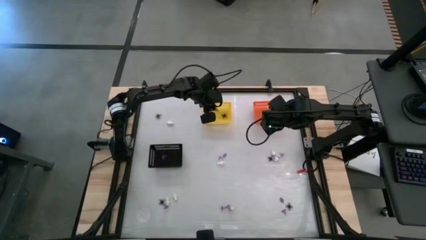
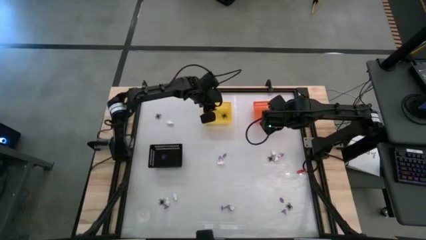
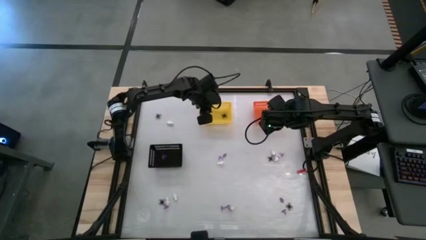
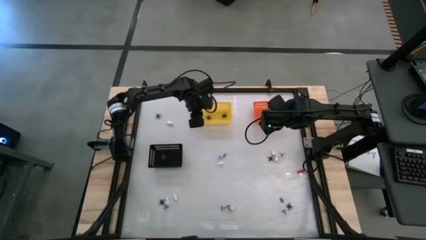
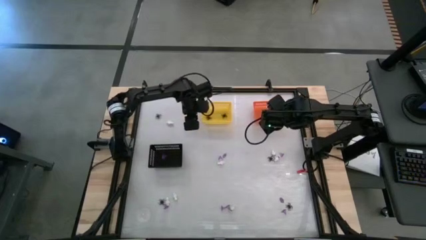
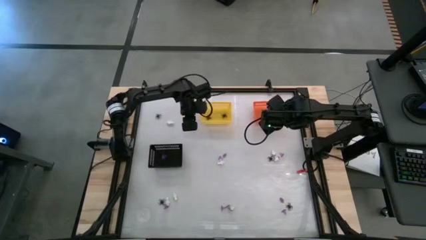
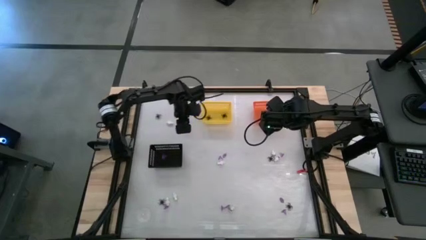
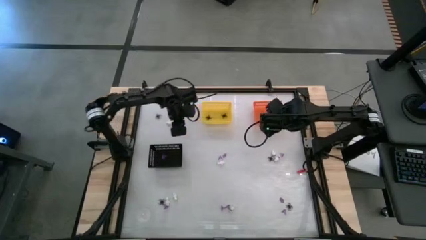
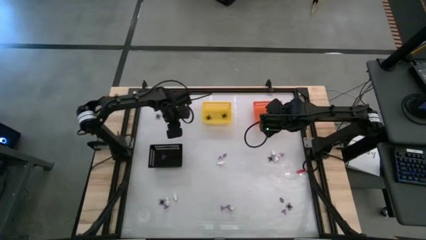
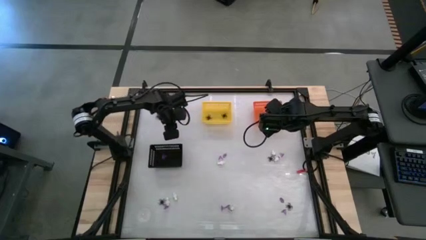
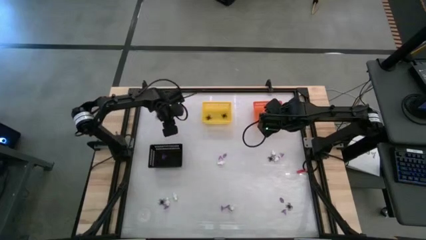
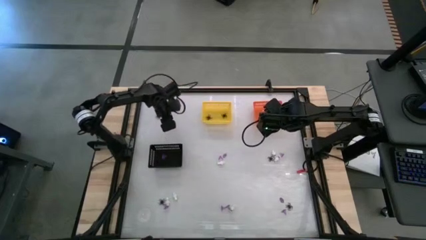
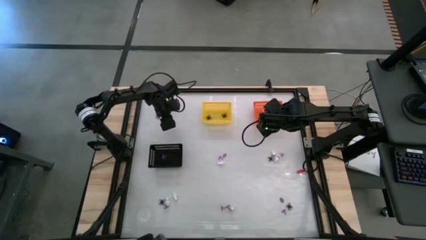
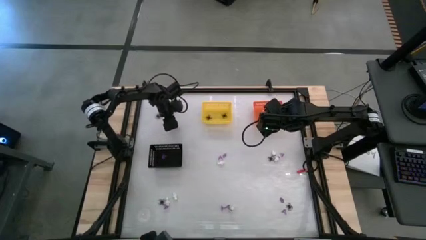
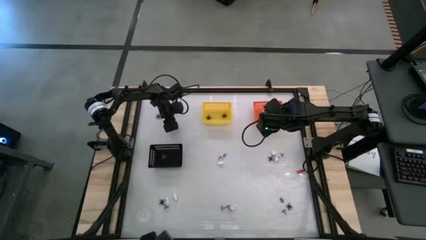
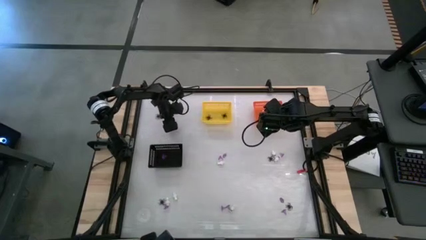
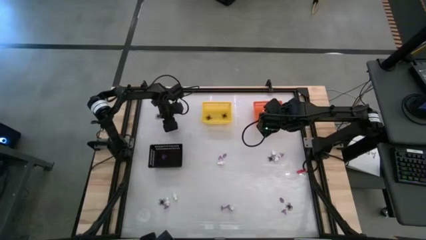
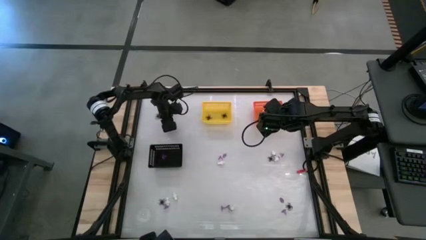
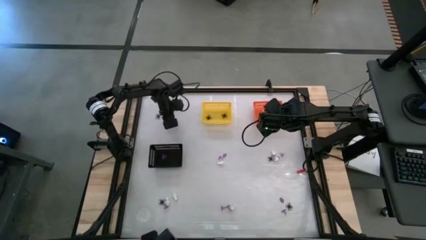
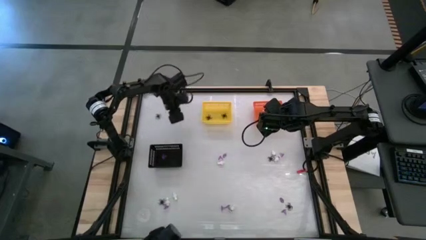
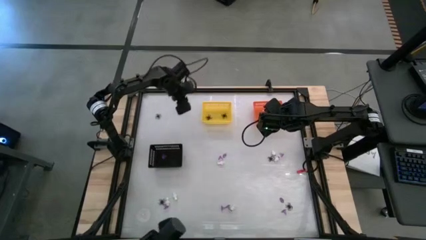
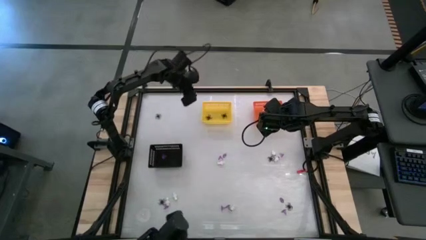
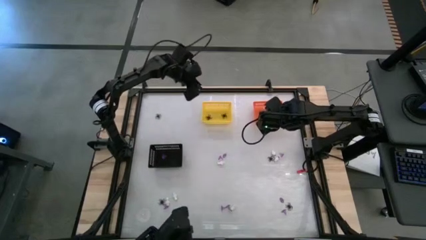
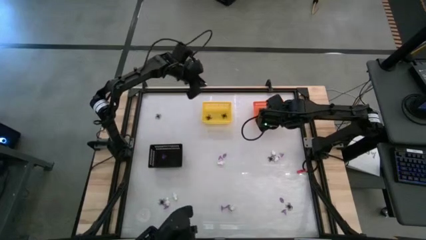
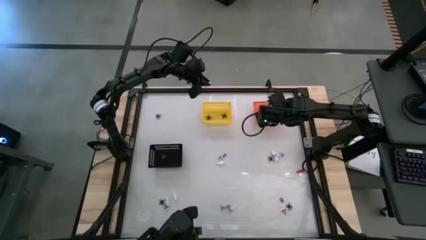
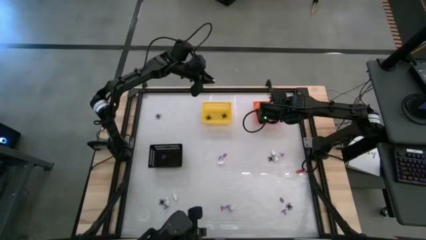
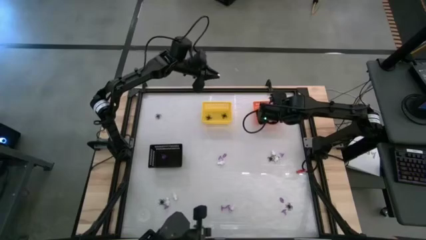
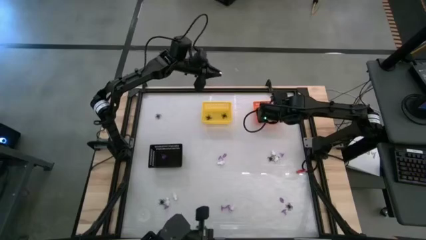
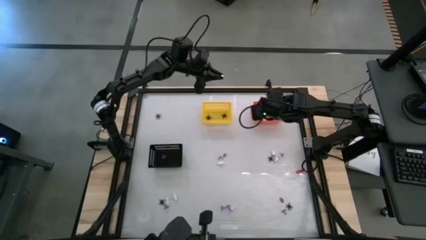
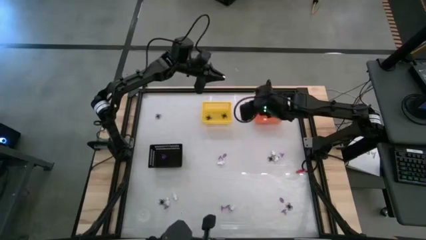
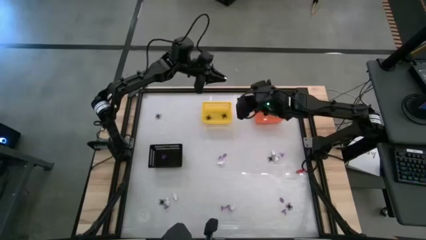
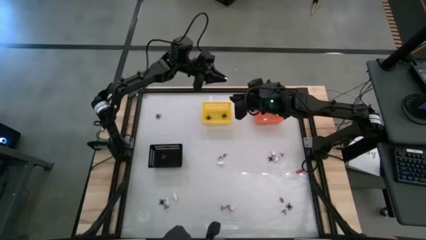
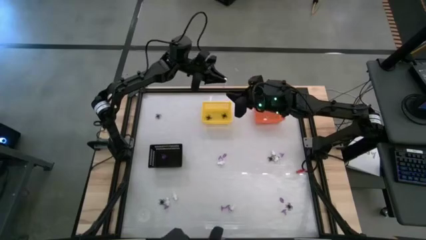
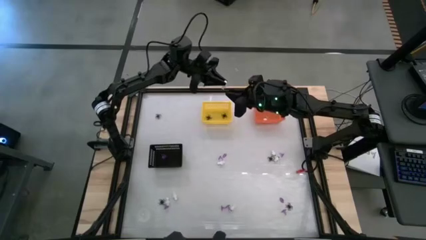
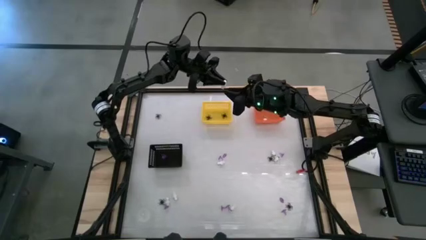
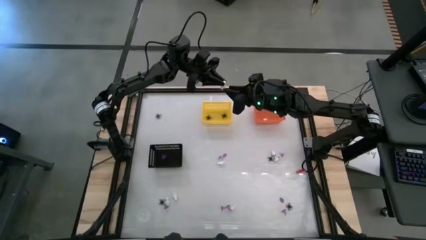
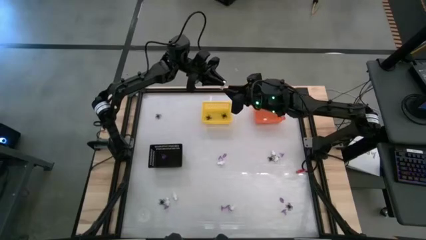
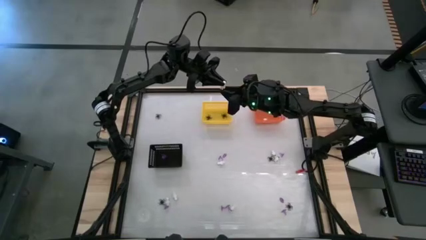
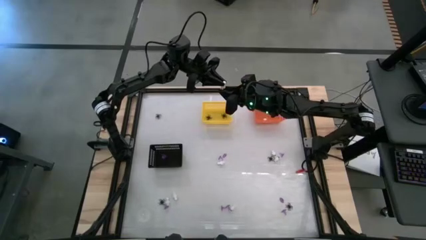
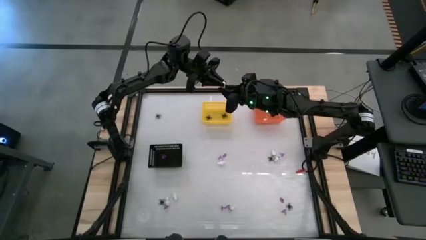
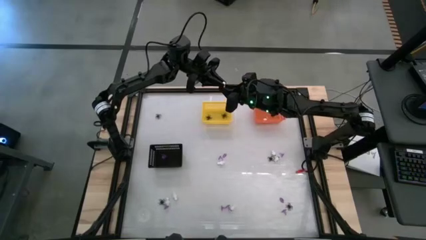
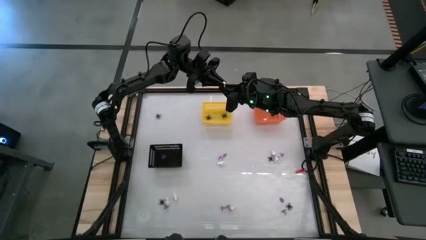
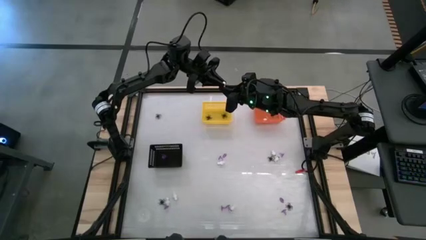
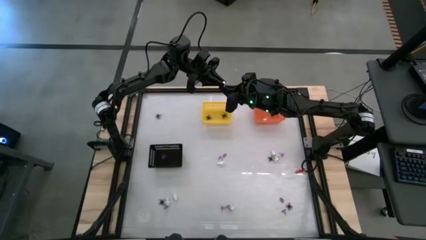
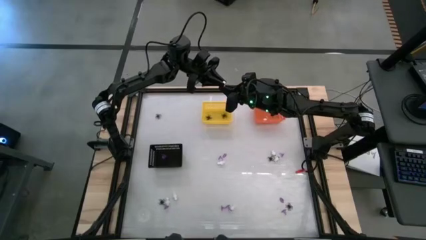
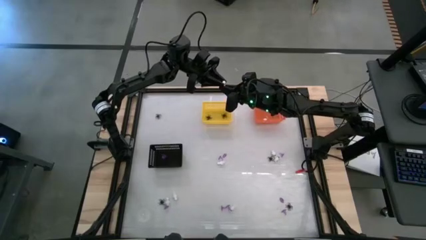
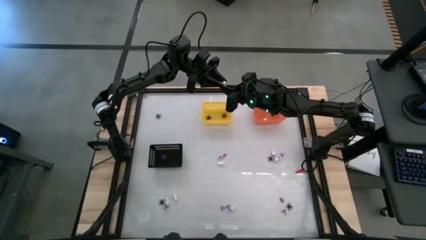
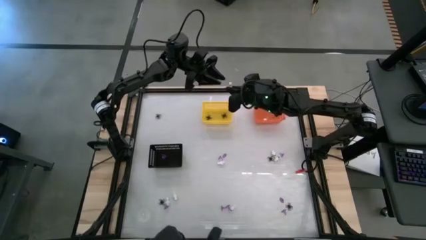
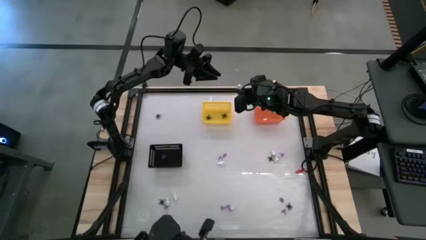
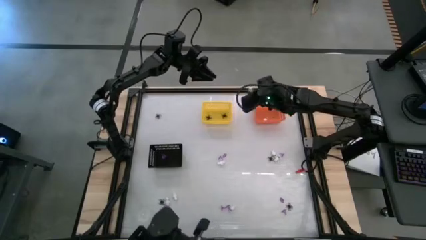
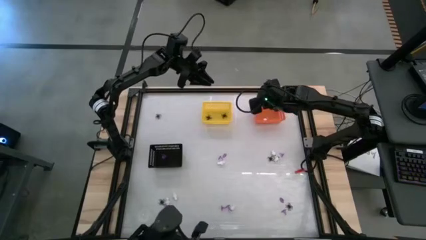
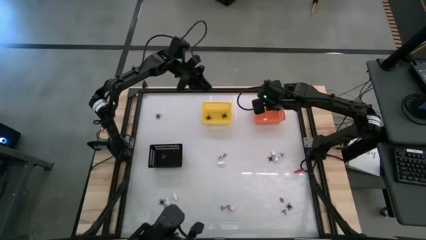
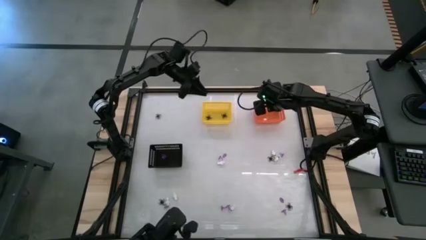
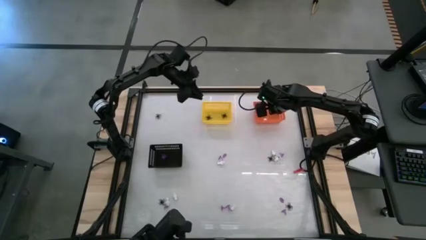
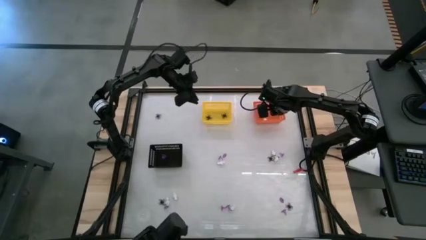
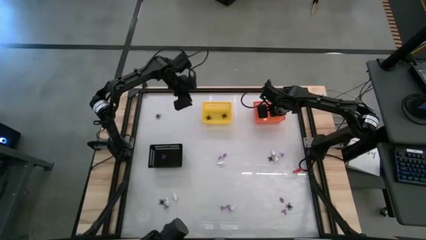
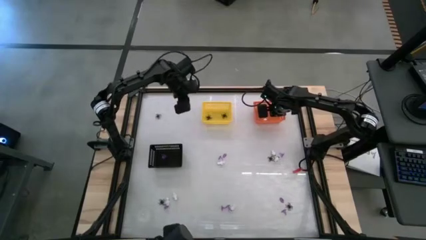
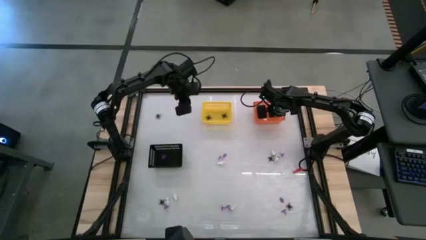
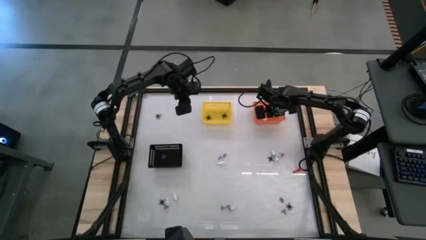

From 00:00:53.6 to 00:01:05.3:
Task: Sort Halloween decoration
Put the white skeleton toy into the orange basket

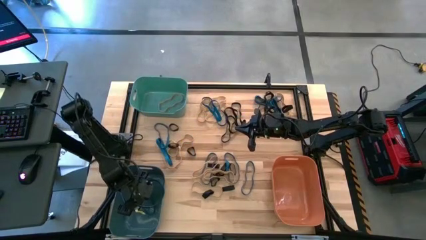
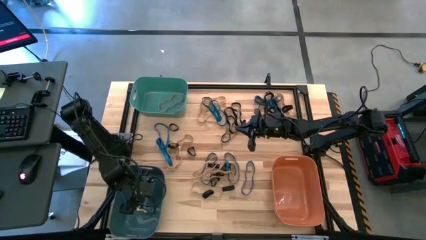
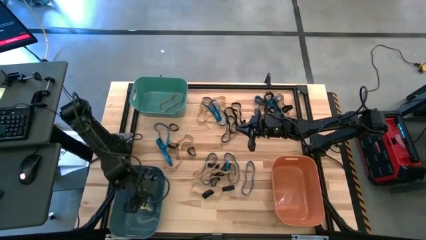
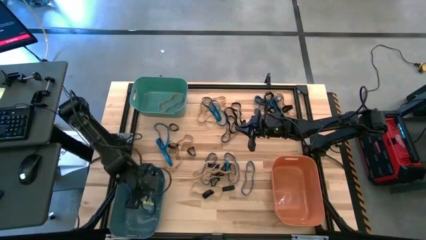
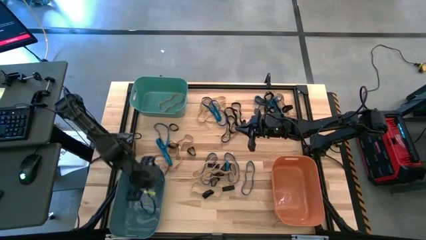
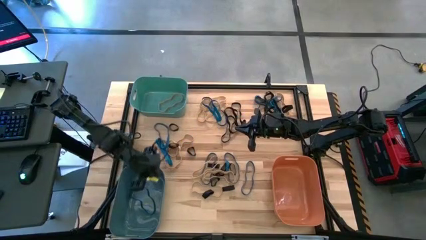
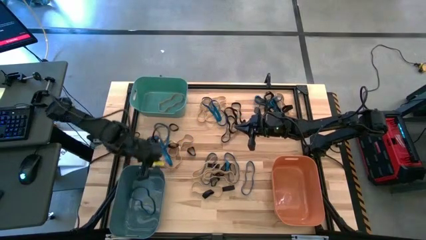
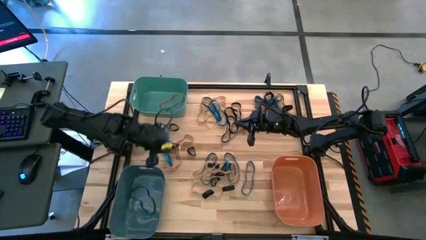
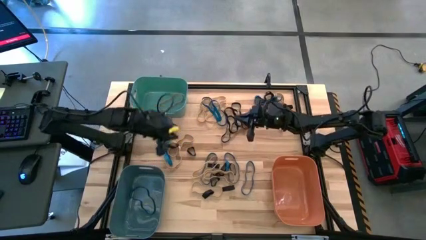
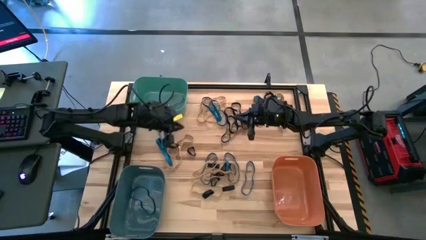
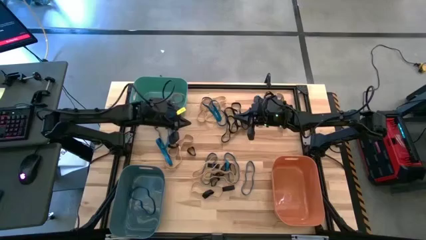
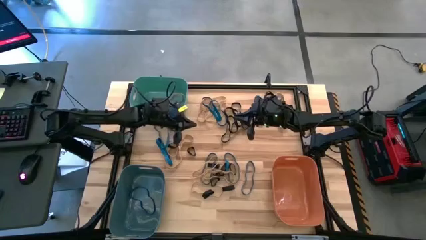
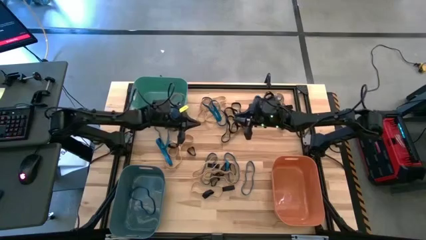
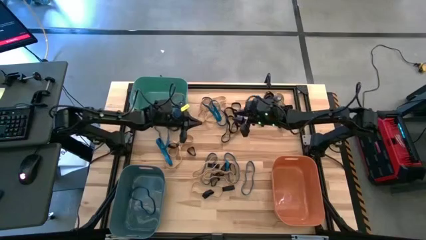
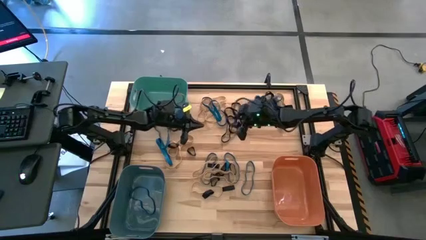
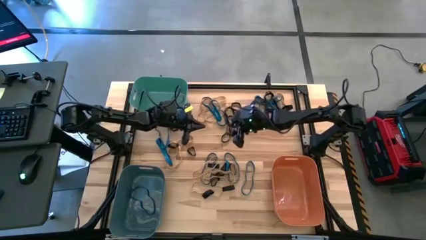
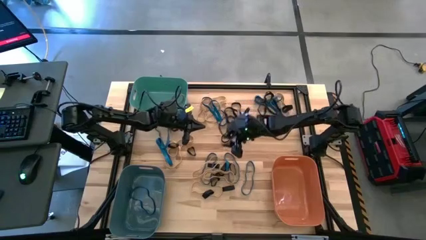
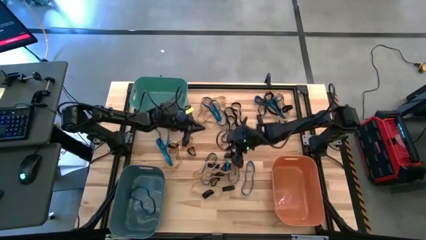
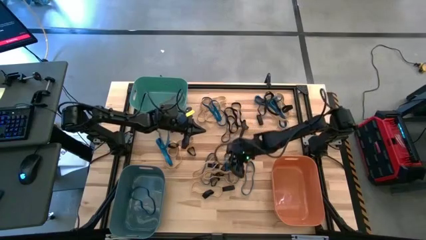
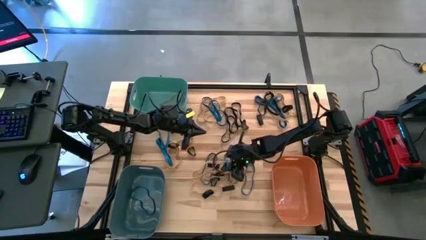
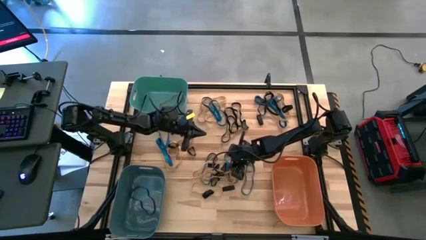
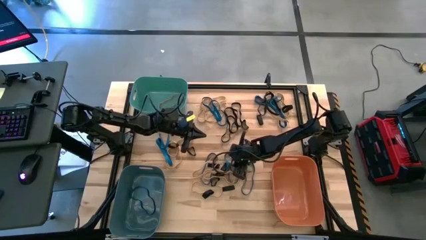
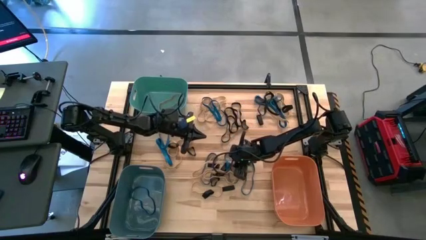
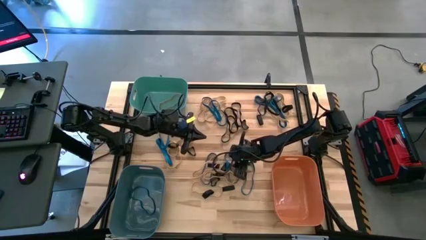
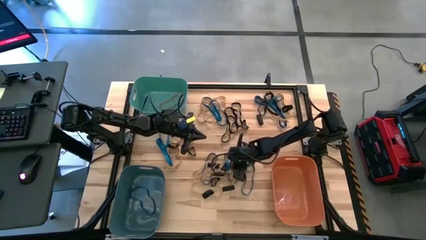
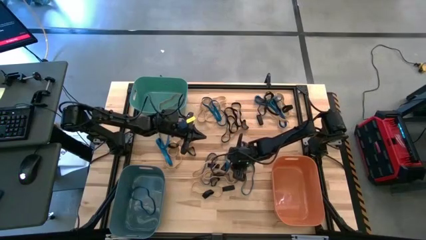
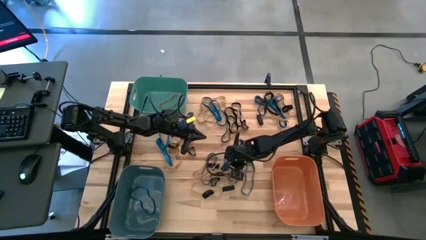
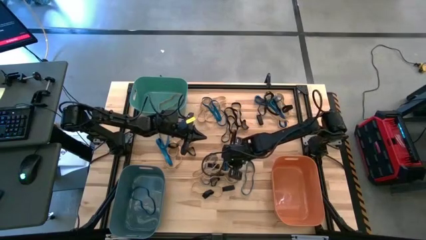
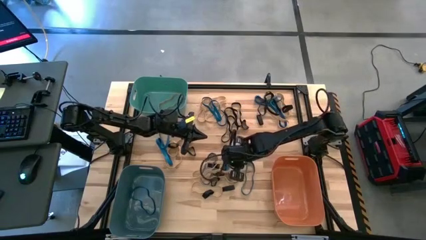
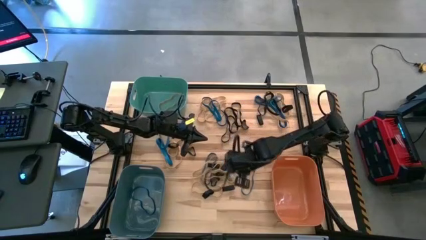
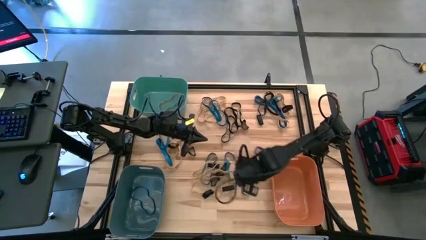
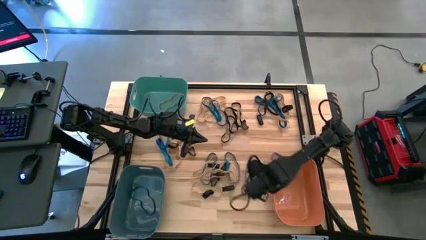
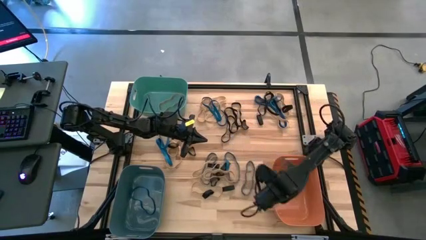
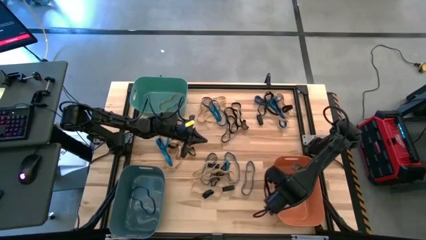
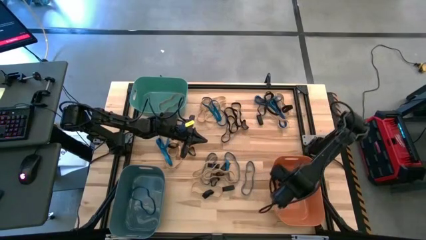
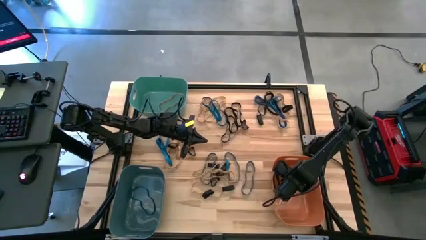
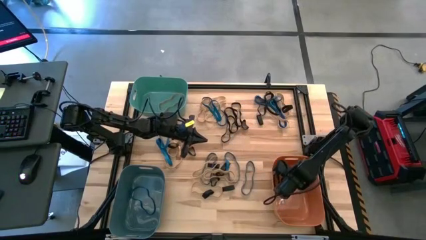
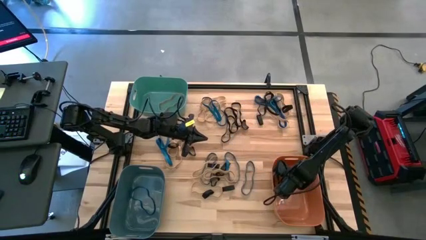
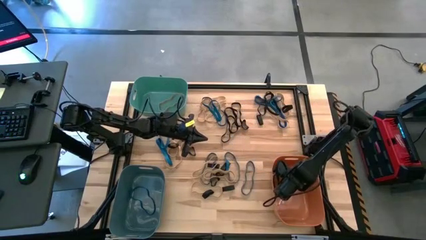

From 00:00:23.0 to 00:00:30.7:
Task: Sort rubber bands into baskets
Put the black rubber band into the orange bin
